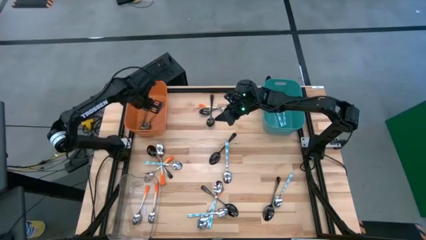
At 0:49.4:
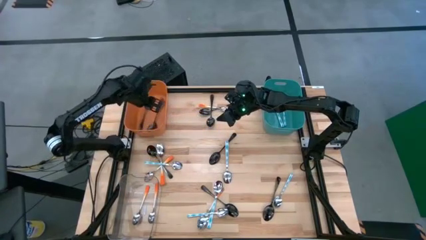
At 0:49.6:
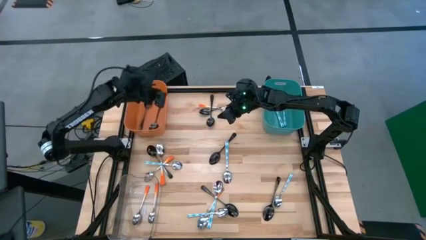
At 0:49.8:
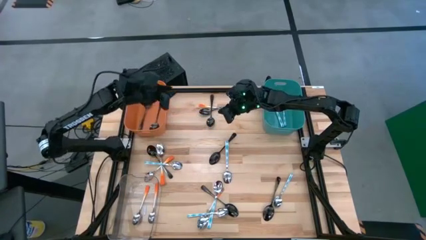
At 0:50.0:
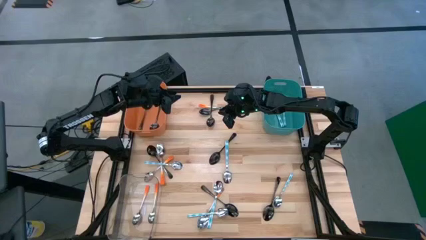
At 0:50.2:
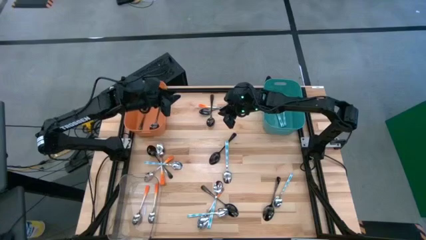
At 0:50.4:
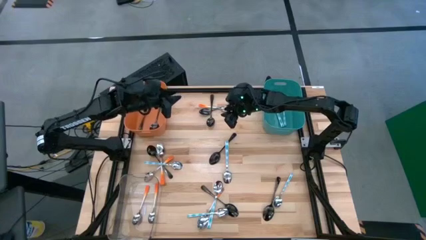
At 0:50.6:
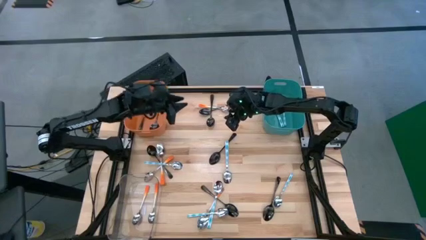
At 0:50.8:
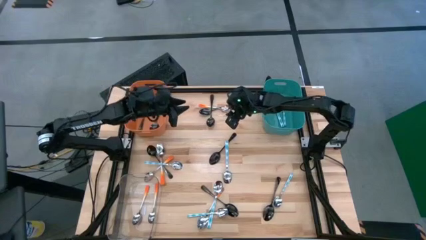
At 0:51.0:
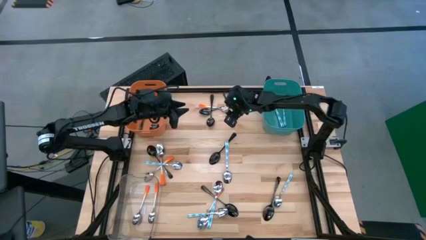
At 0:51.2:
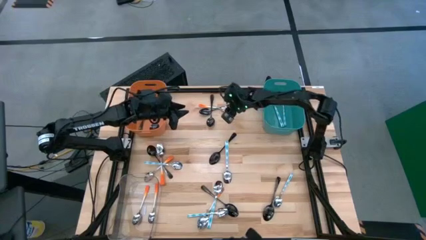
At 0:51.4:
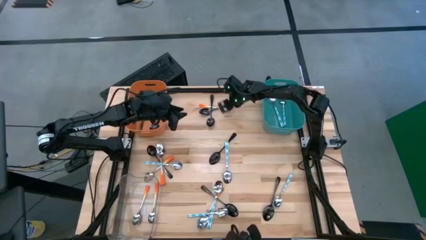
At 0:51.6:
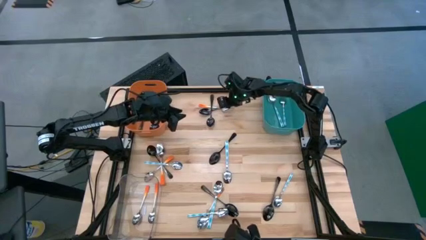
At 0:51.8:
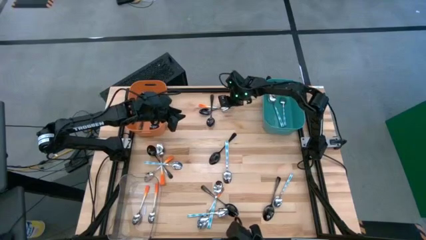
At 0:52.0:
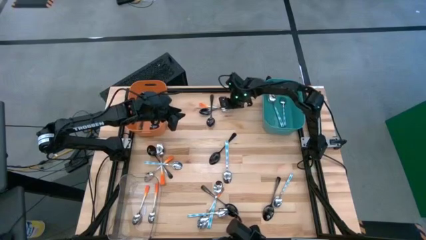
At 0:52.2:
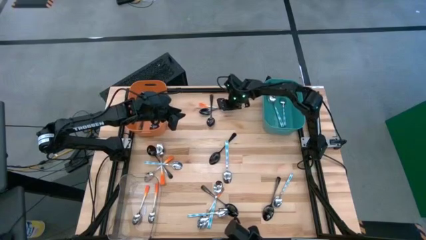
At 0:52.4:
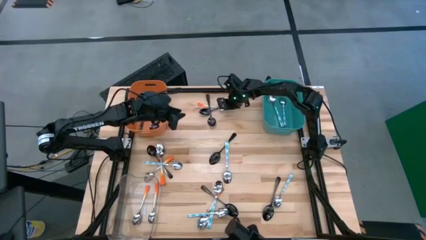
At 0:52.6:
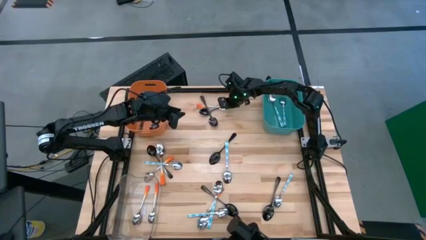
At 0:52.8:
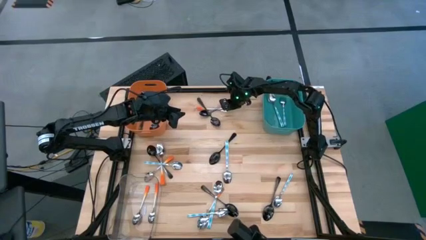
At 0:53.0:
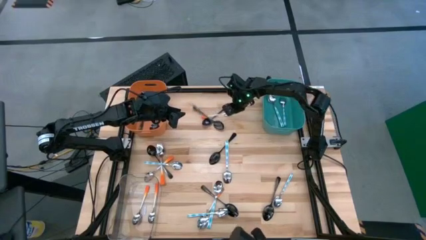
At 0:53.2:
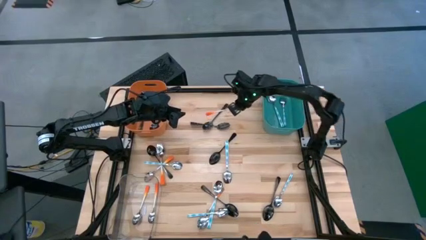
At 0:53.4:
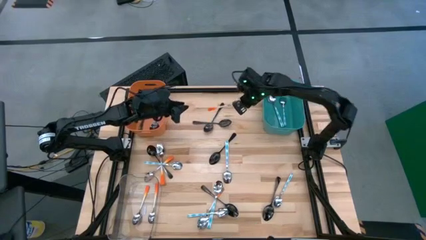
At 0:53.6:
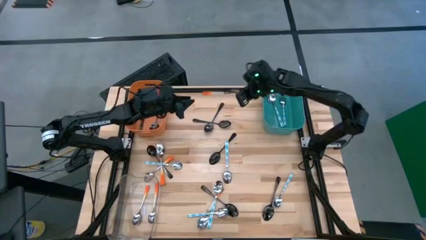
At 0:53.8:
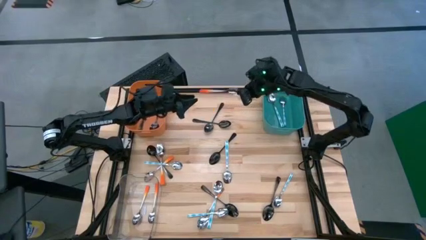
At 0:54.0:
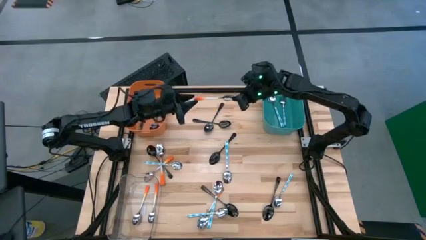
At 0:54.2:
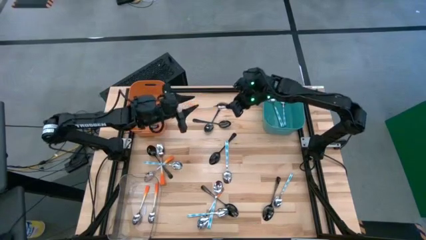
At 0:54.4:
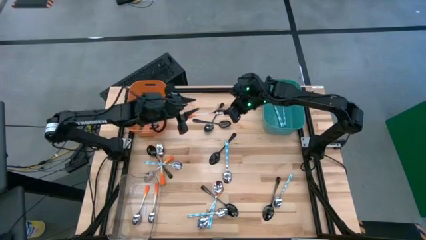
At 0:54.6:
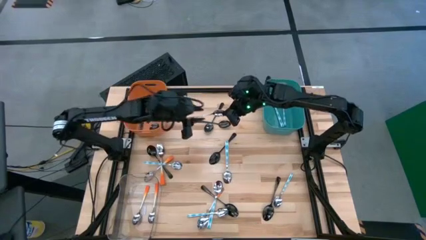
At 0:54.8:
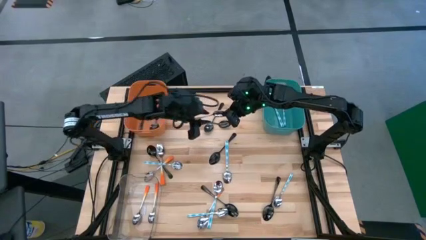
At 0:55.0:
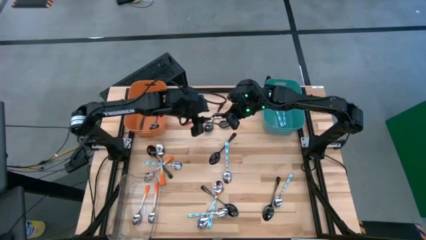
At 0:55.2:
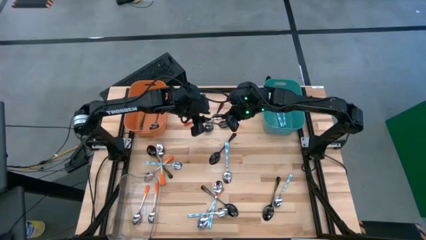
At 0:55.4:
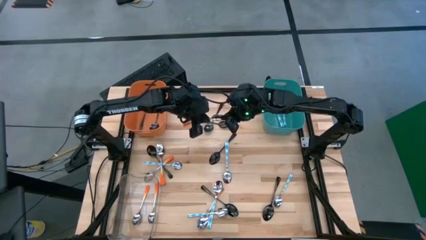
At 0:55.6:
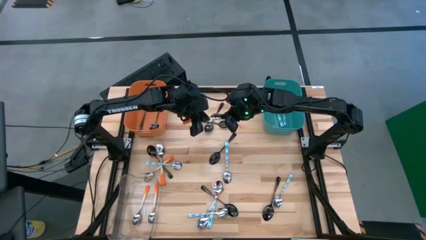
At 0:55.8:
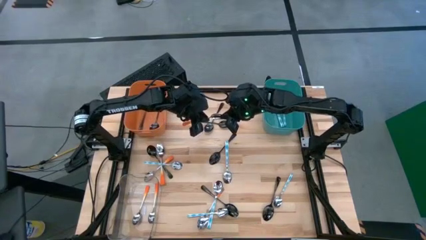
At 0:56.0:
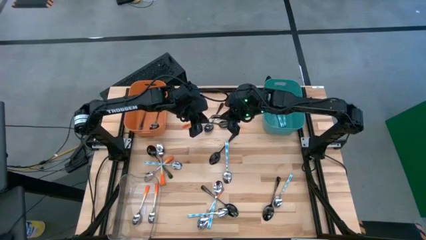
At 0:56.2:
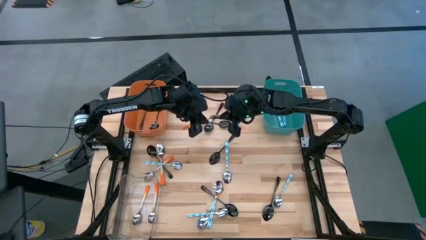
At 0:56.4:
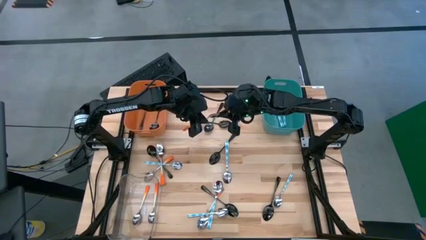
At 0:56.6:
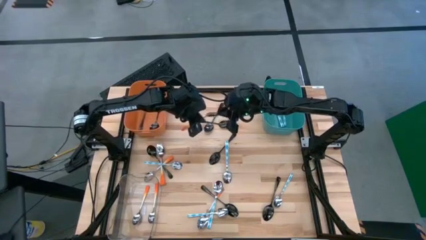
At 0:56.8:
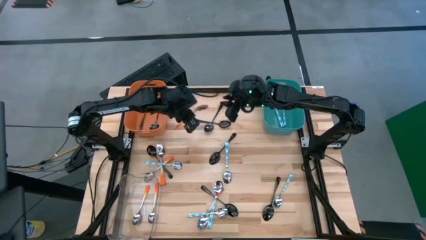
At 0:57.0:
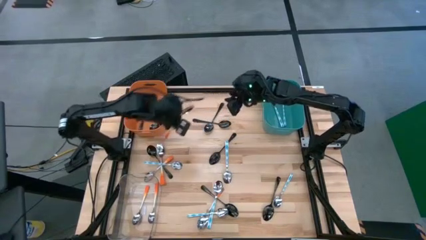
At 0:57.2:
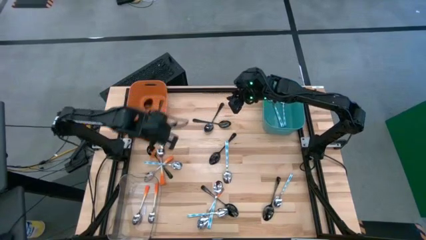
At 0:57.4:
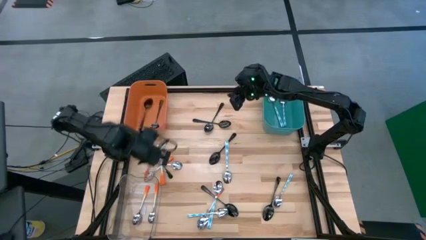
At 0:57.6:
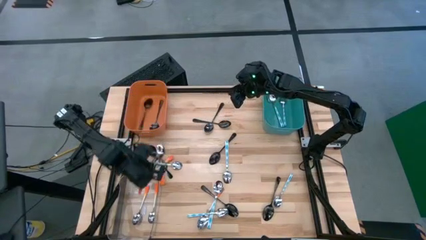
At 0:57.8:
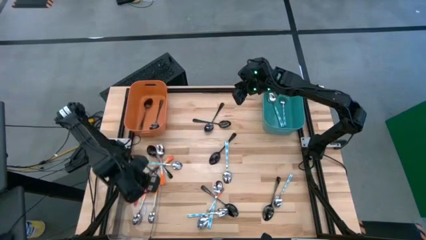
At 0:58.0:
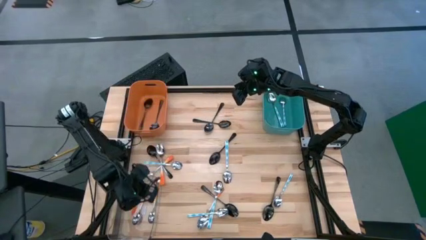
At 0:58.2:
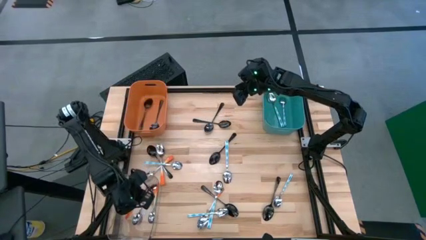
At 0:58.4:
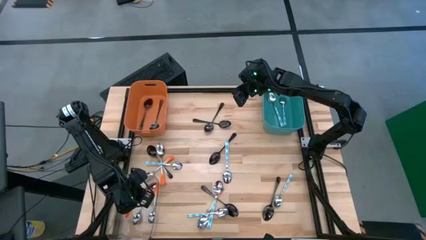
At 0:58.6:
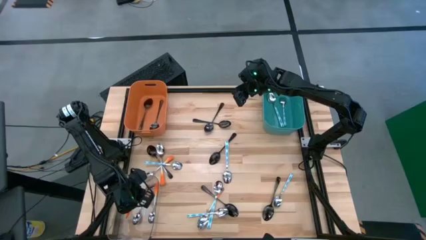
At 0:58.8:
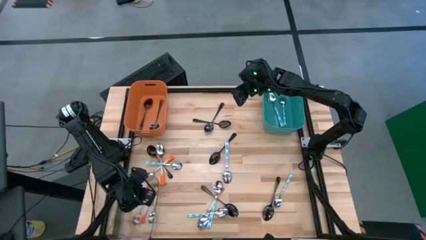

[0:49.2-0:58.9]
Task: Sort silverware by color (type)
Put the orange spoon into the transparent bin

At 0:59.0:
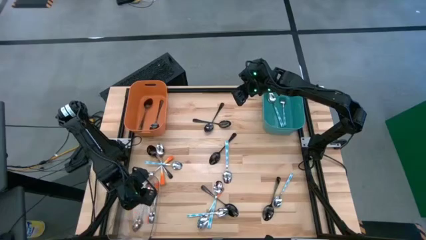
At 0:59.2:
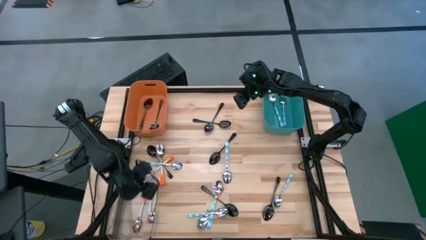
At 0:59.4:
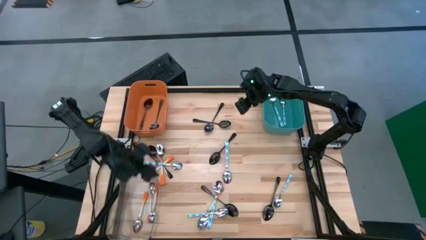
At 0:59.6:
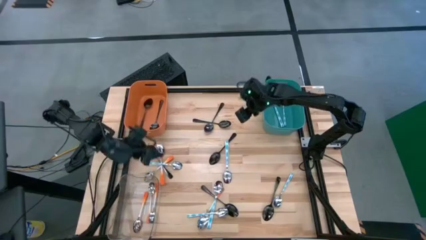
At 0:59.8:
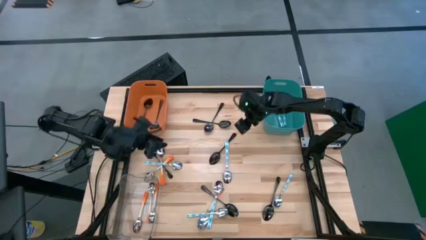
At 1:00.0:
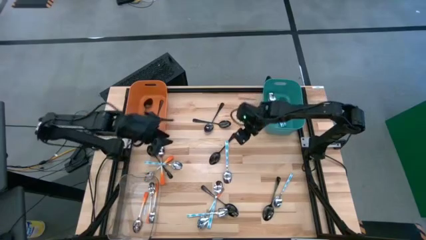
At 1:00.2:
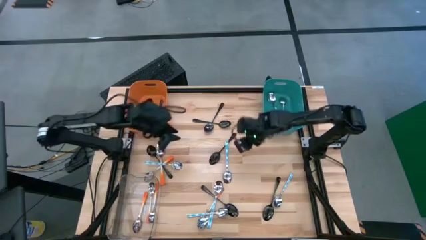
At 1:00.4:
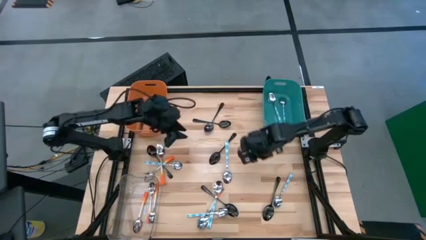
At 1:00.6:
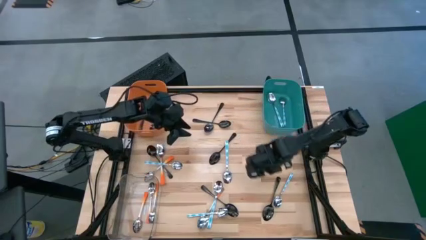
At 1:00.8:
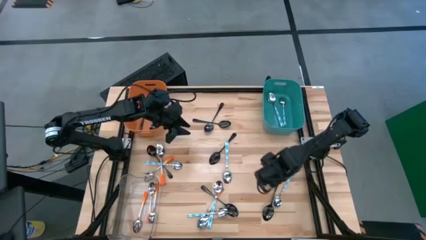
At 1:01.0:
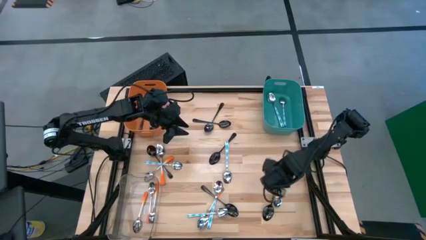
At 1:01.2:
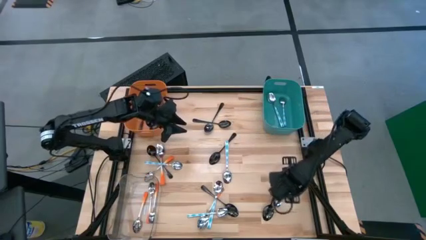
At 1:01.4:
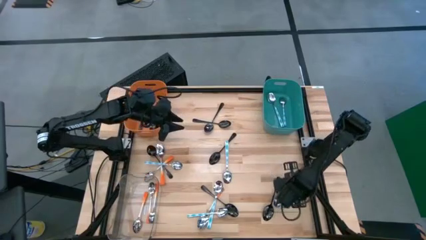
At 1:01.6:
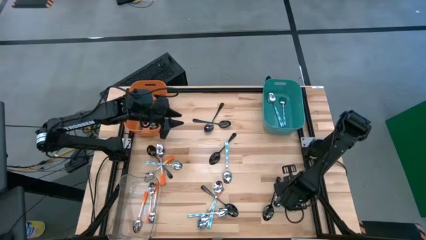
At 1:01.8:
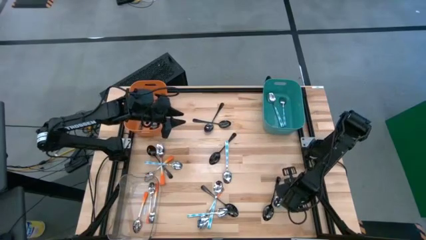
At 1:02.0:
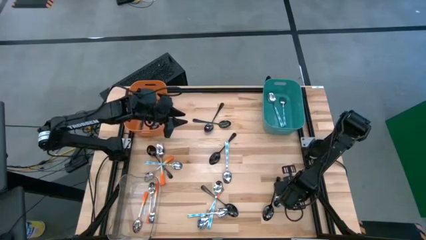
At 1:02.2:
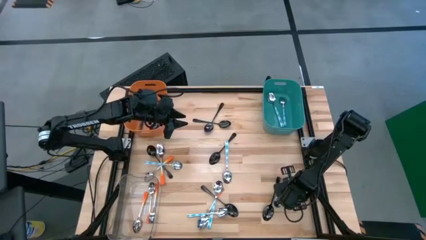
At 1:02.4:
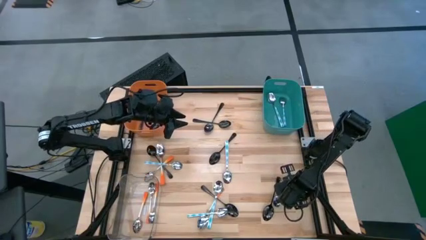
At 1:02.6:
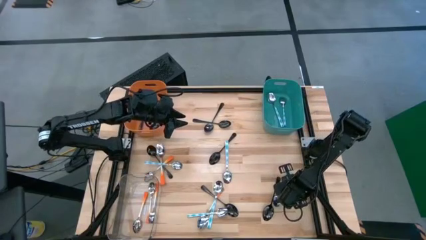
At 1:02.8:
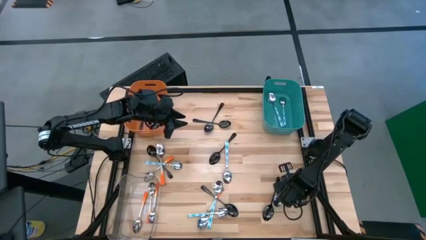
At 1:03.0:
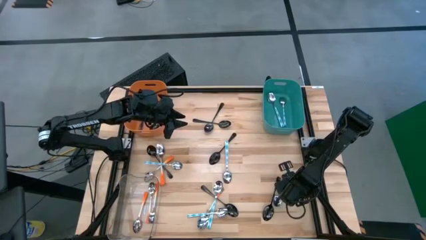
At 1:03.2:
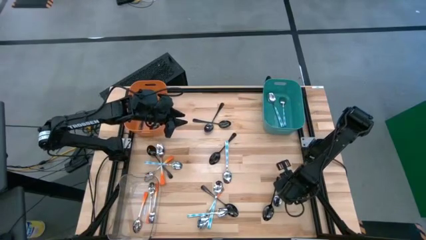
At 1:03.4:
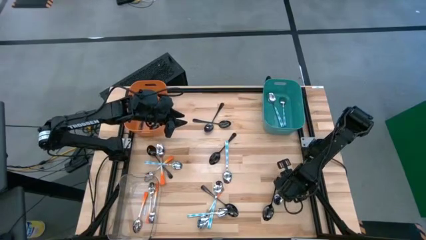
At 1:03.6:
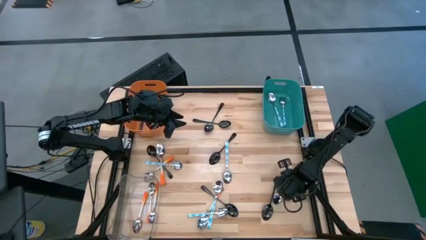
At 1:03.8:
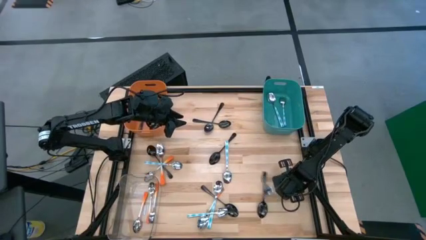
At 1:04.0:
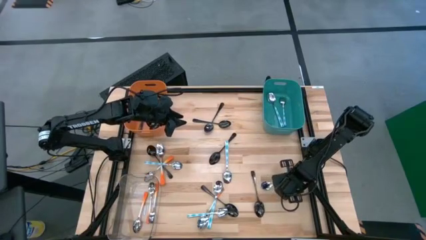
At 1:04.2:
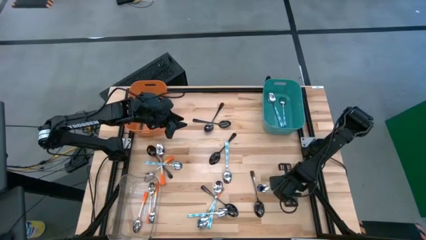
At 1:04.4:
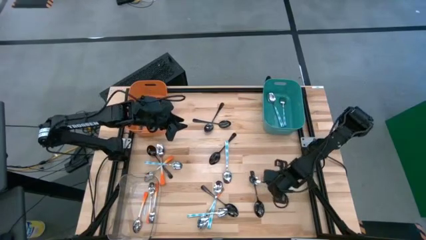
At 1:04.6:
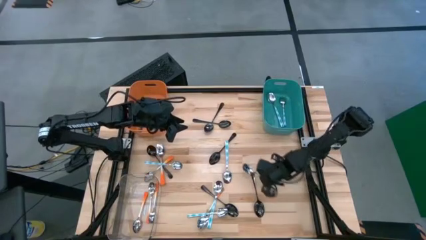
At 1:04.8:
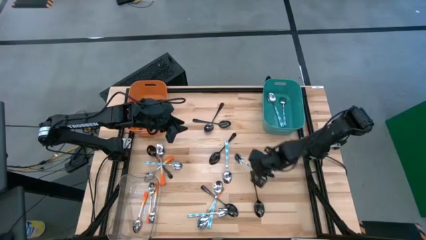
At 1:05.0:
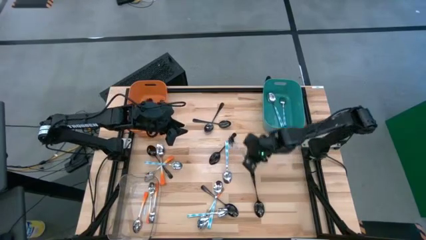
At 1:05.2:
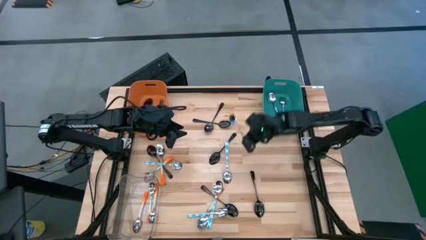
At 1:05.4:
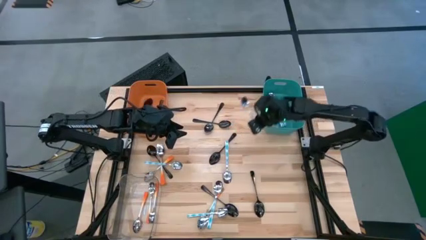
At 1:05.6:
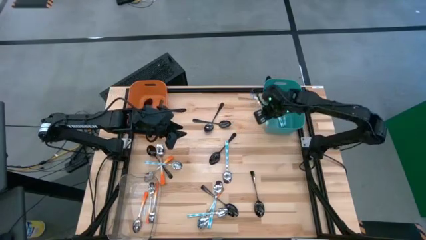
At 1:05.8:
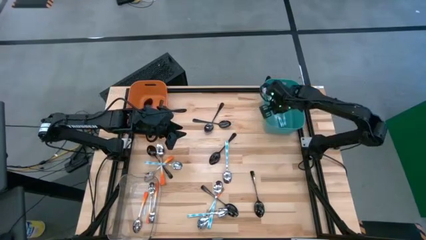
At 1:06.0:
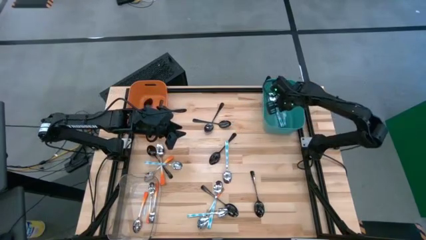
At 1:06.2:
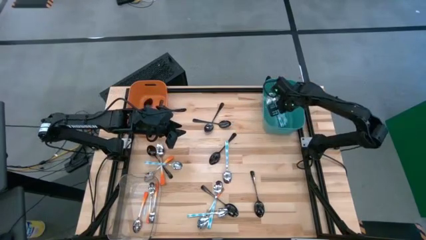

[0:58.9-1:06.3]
Put the blue patterned spoon into the blue bin

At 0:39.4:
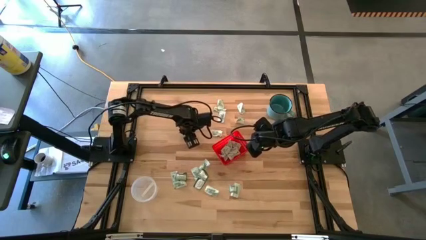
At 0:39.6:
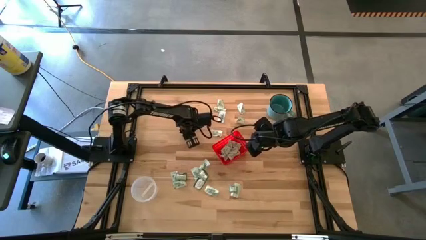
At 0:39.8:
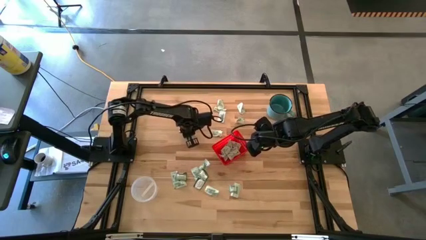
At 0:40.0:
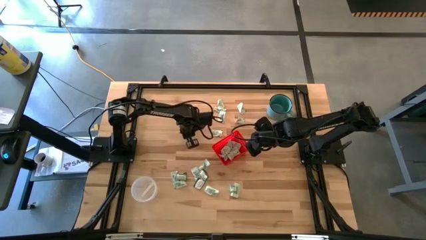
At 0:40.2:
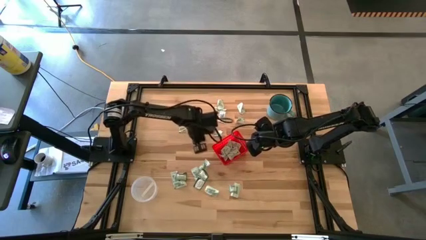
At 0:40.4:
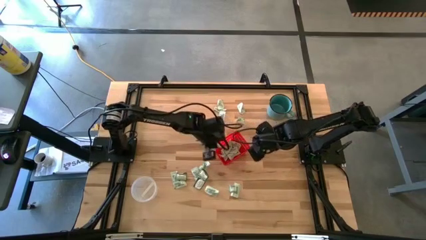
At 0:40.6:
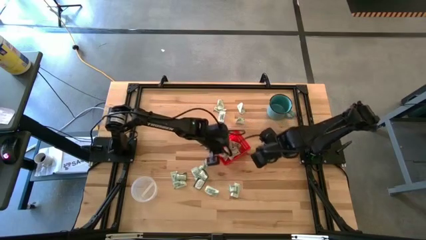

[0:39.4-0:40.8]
Task: Pick and place items into bin
Put the green stevia pack into the red bin
